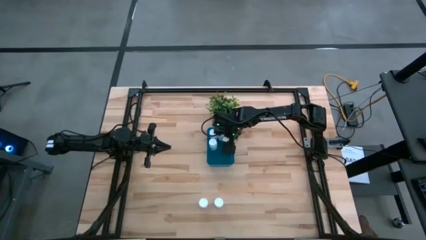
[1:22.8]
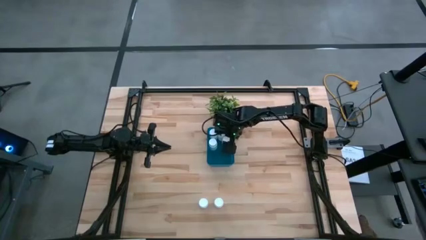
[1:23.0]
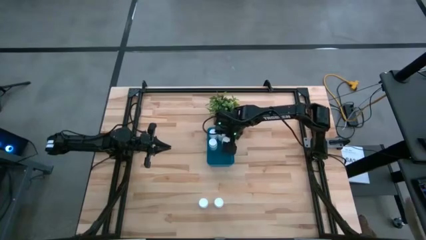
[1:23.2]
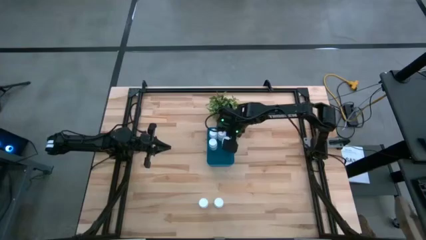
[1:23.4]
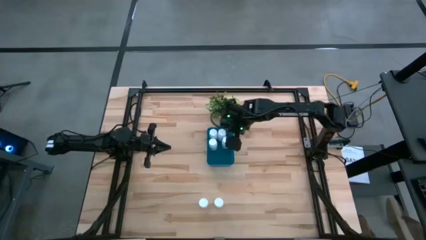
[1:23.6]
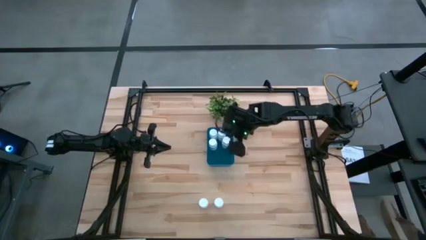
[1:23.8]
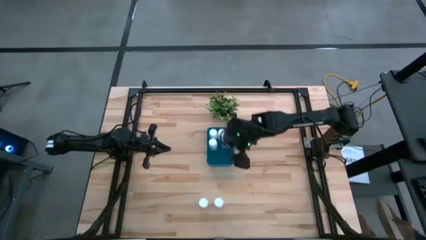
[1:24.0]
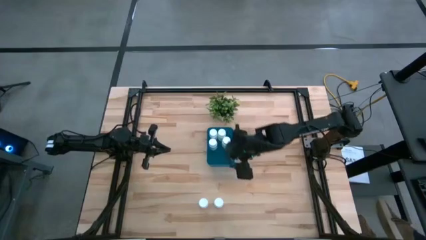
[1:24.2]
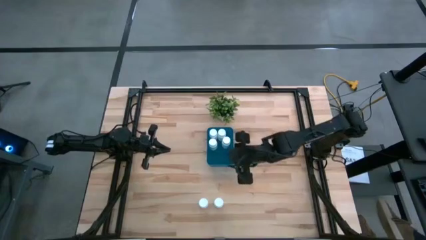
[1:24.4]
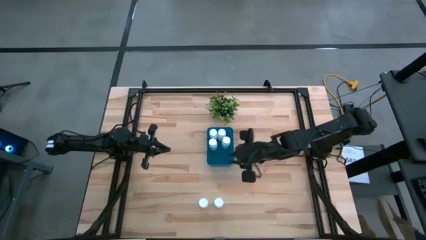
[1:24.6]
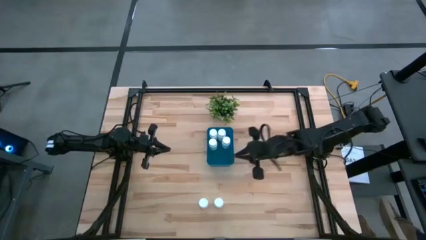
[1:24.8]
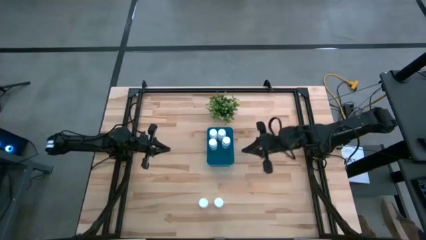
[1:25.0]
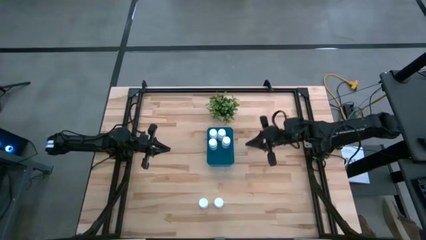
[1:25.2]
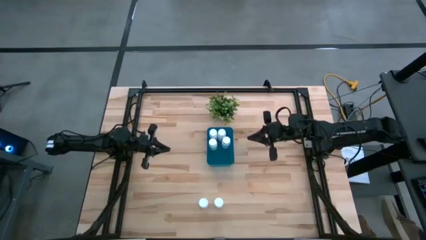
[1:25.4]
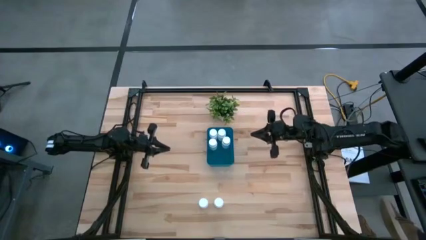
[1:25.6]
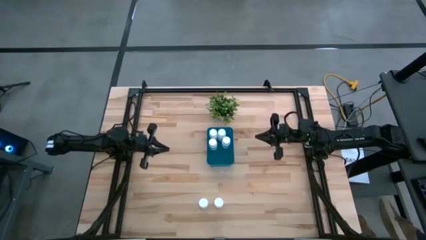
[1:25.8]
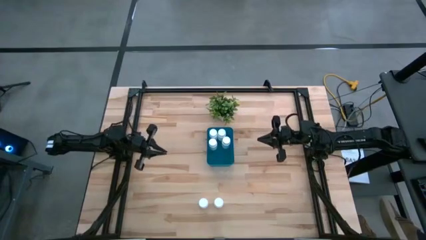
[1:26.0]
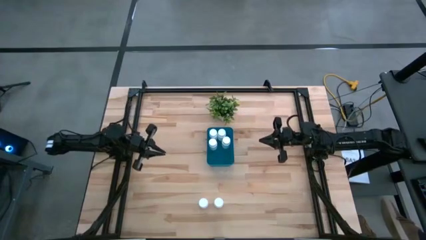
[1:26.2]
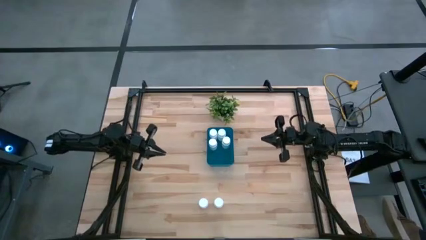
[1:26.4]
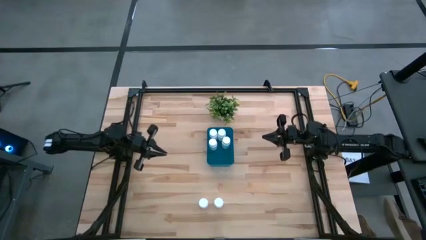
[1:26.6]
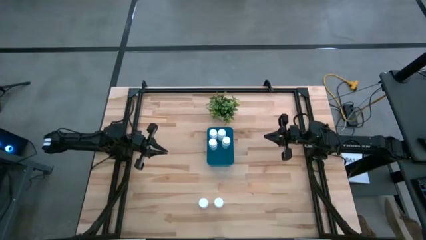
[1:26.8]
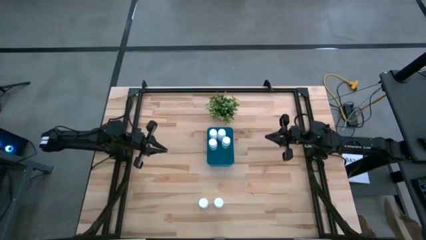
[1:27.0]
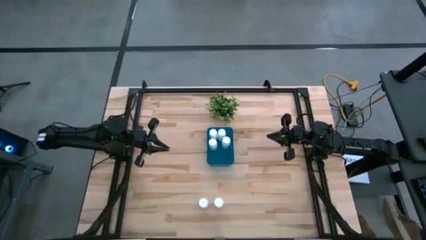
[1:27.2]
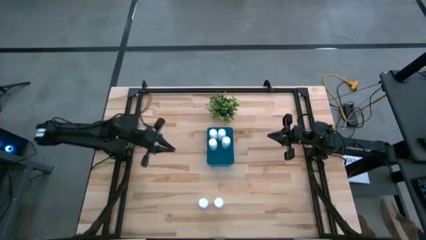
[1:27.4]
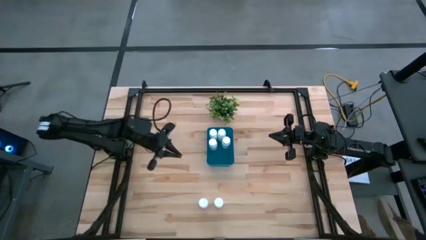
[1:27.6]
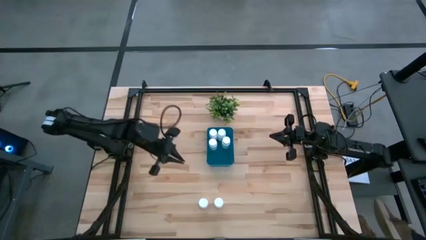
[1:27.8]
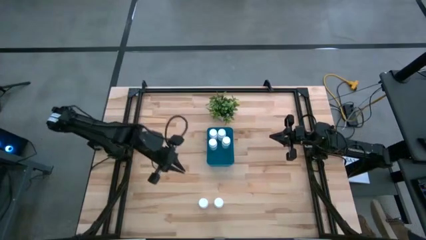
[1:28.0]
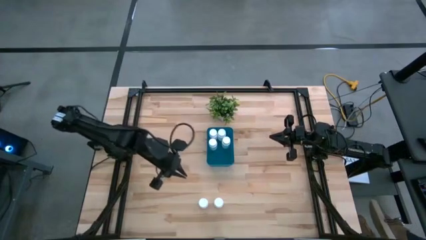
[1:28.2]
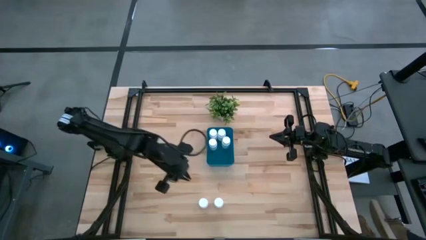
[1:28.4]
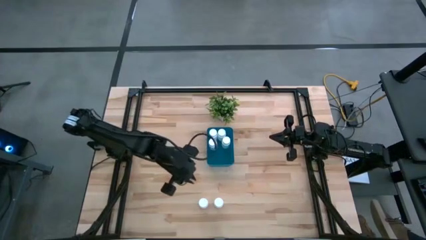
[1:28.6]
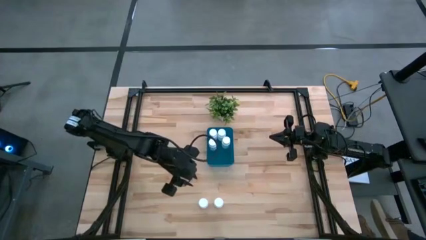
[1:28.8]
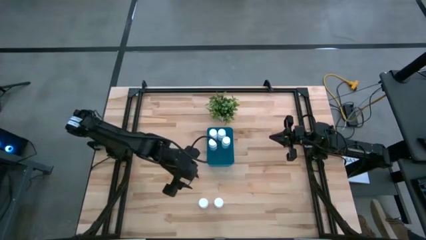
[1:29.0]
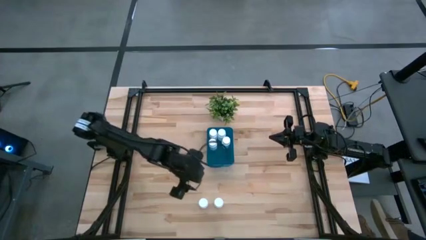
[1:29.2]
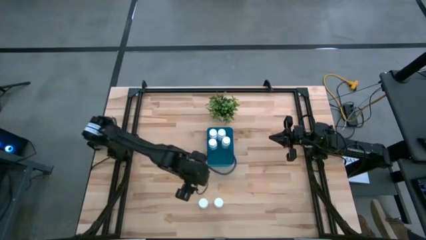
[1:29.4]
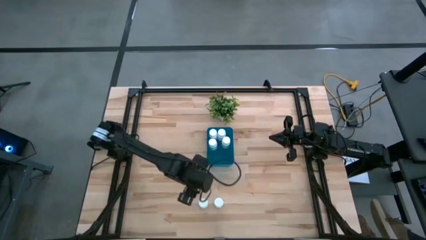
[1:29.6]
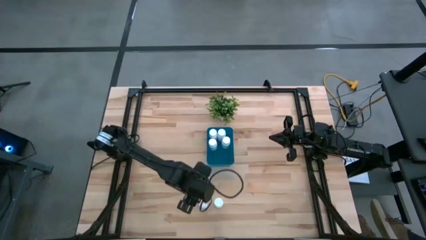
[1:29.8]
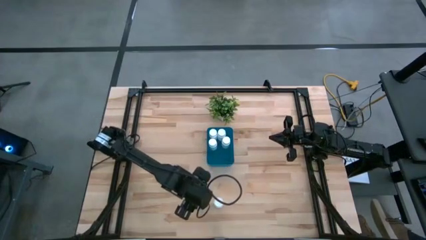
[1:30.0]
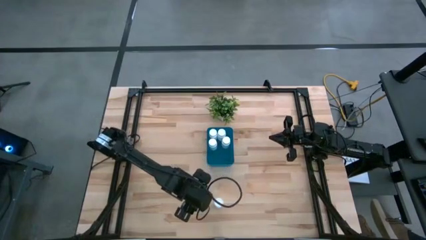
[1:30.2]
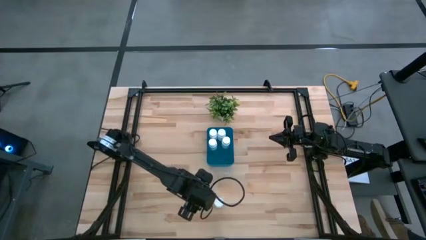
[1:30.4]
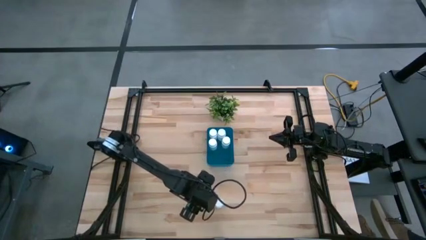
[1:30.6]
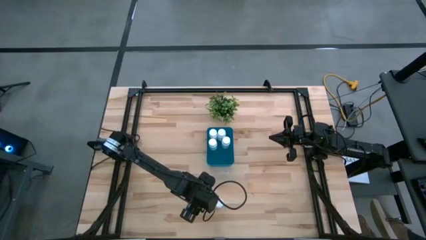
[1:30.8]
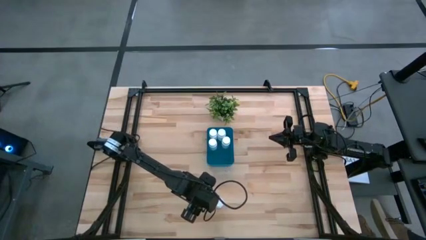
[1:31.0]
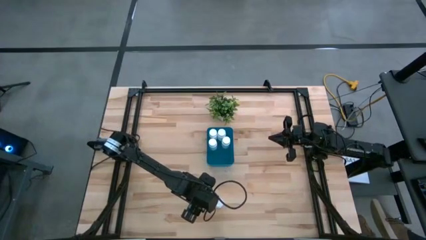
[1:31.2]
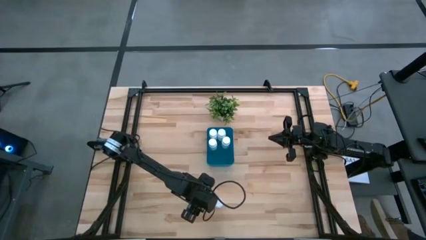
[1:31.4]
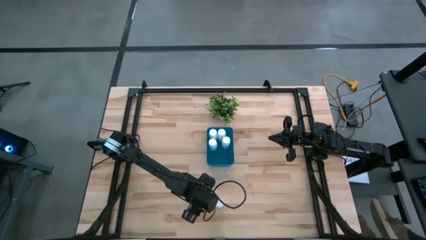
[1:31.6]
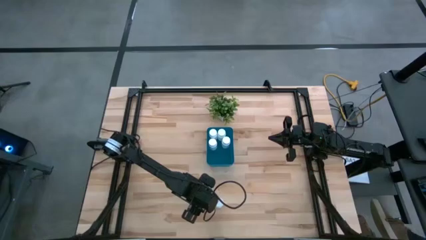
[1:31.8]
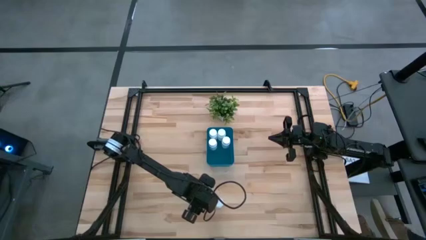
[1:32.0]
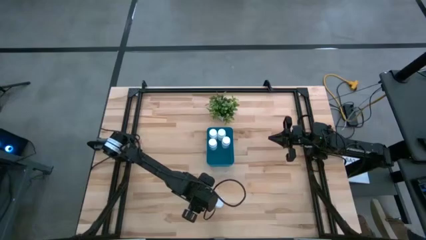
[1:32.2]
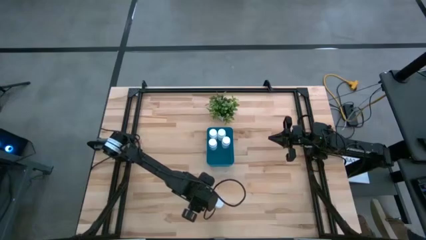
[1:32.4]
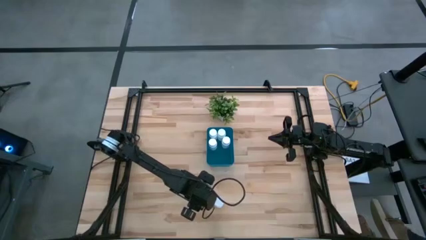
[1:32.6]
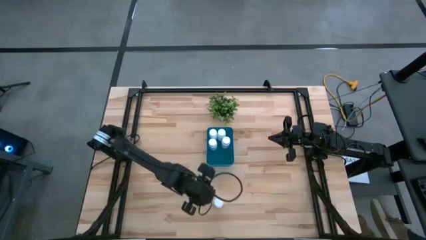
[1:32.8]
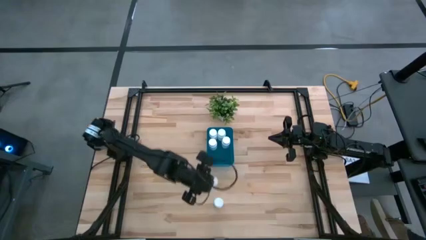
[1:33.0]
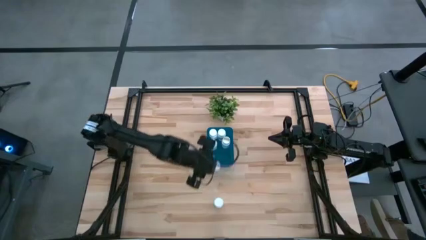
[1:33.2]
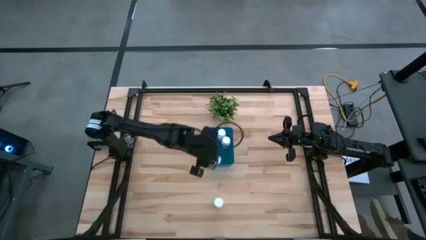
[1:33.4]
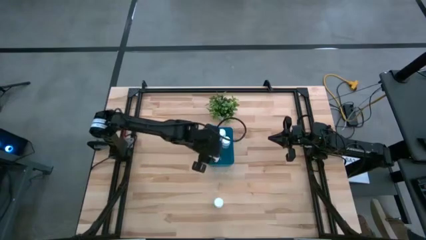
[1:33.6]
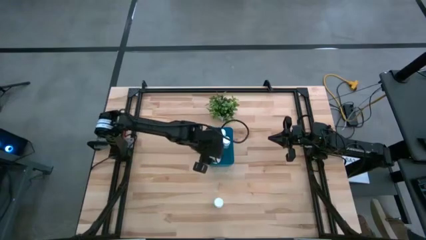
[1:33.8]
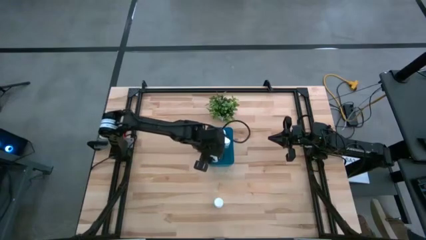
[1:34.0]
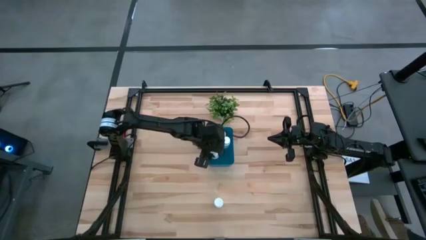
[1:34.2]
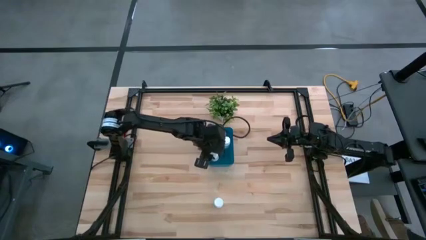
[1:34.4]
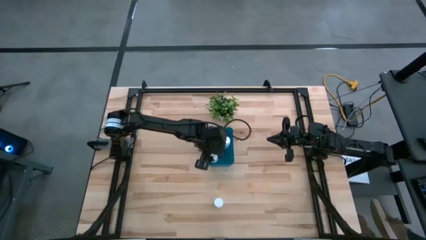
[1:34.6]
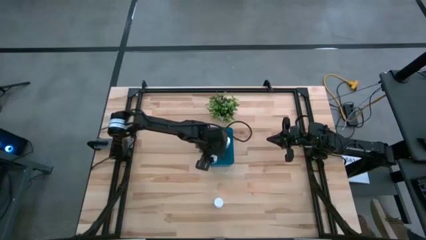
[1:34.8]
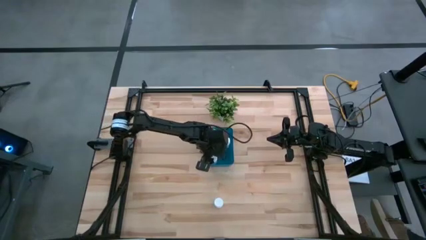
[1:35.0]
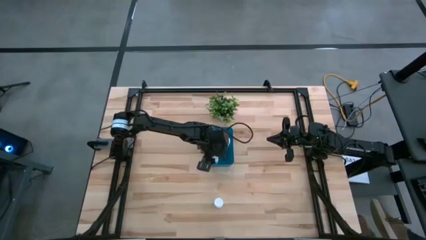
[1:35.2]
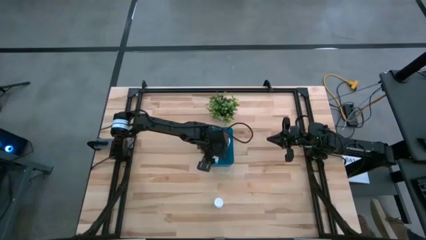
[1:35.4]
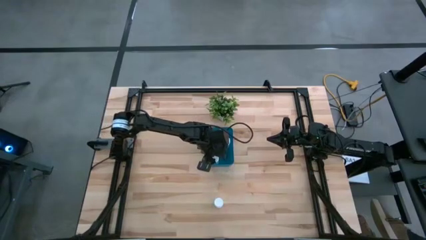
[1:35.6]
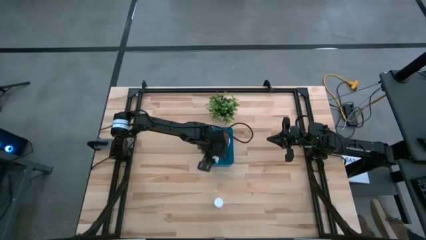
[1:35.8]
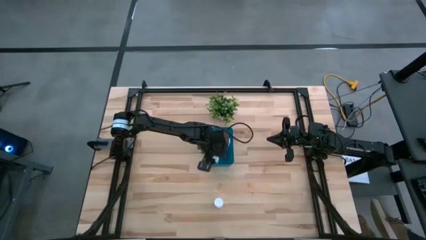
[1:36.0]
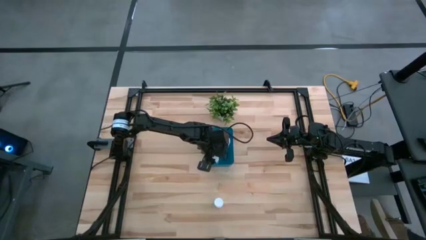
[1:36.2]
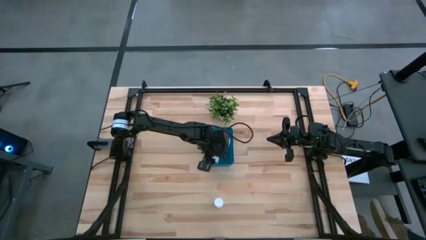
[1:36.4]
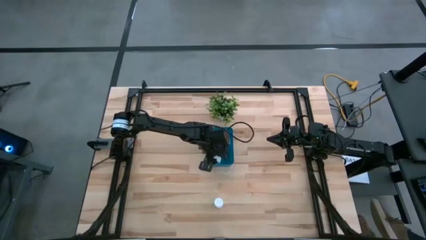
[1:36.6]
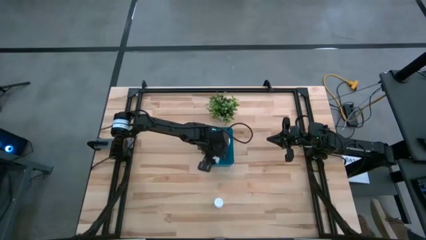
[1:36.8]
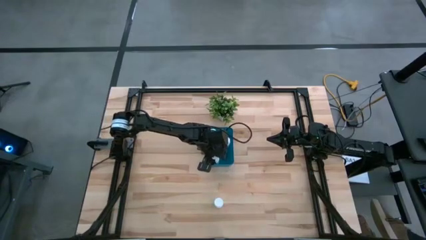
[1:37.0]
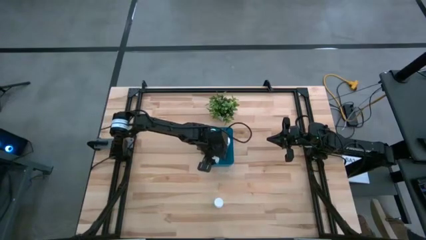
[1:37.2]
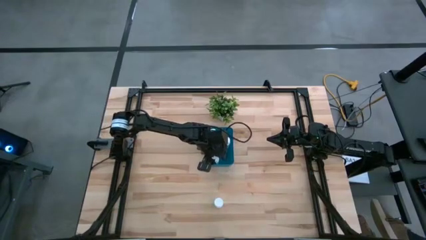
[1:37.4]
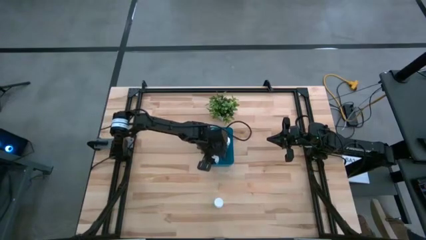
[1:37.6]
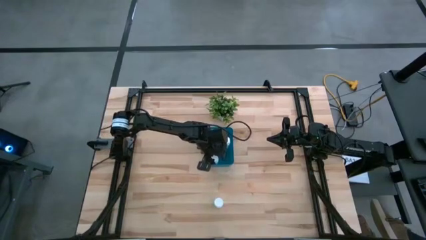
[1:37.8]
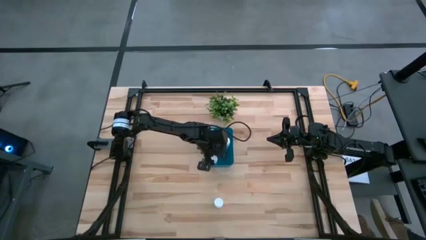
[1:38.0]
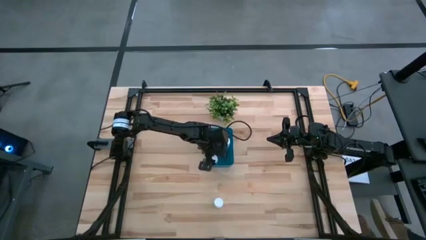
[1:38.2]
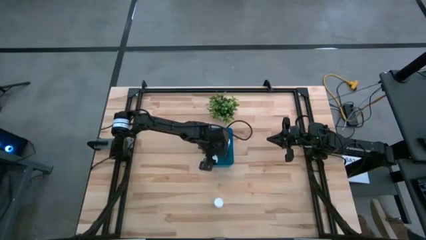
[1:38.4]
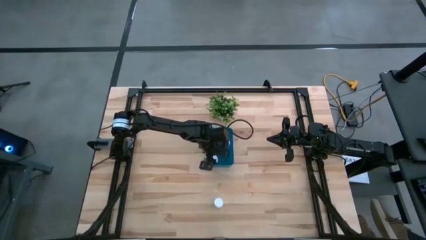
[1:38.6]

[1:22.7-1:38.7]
Task: Pick and place pill bottles into a basket
Put the white pill bottle into the blue bin
